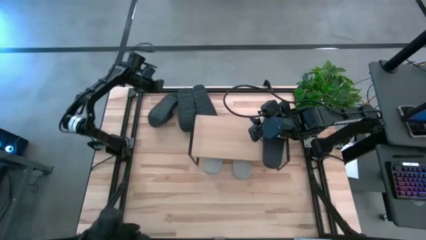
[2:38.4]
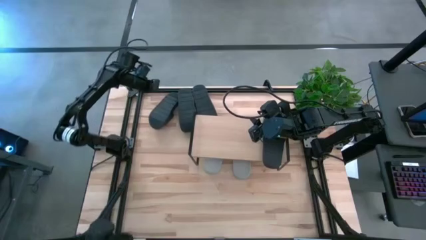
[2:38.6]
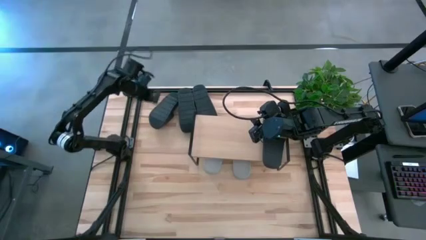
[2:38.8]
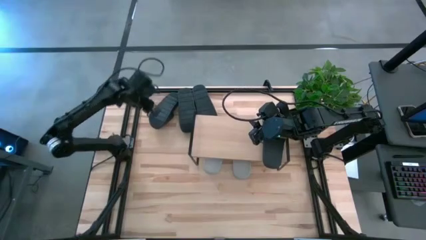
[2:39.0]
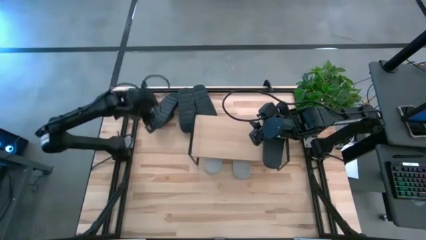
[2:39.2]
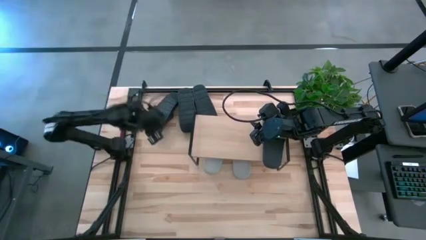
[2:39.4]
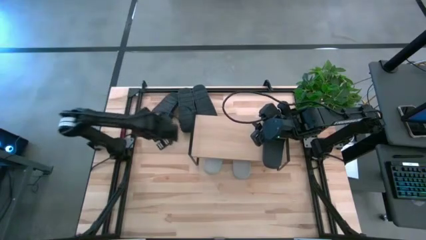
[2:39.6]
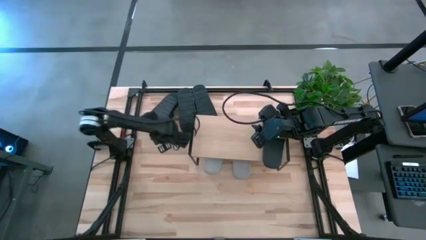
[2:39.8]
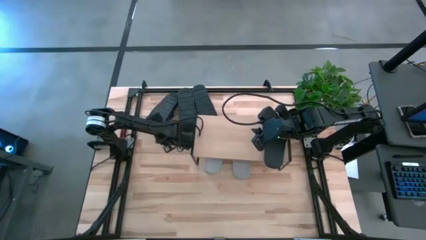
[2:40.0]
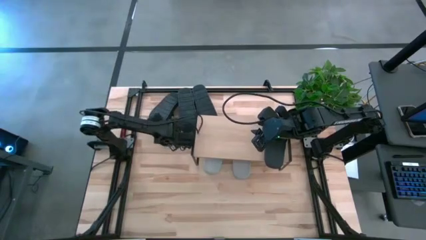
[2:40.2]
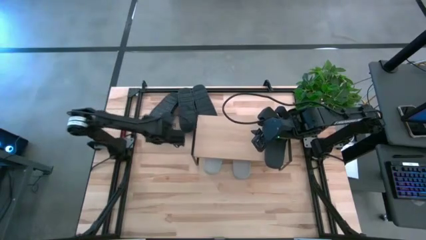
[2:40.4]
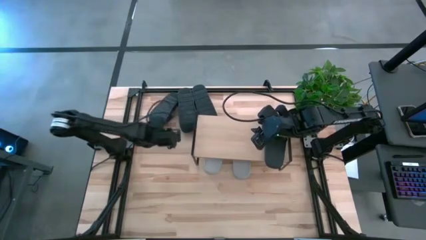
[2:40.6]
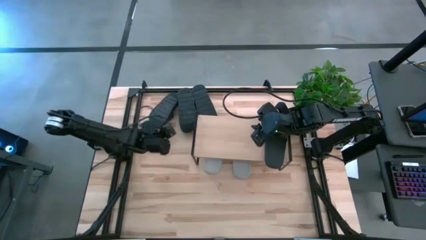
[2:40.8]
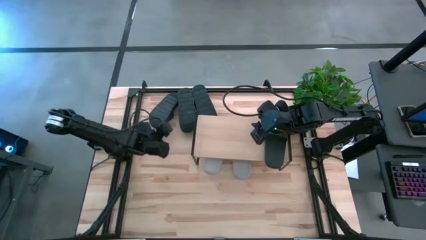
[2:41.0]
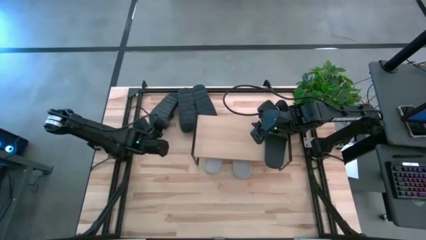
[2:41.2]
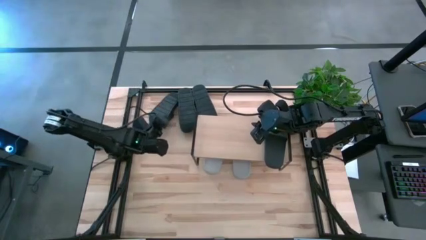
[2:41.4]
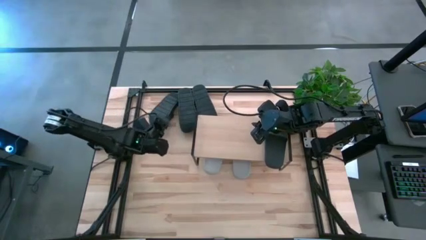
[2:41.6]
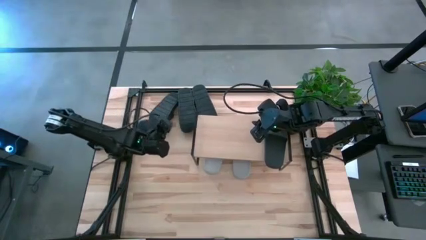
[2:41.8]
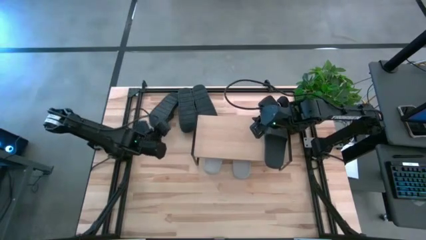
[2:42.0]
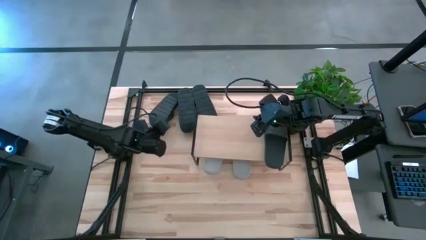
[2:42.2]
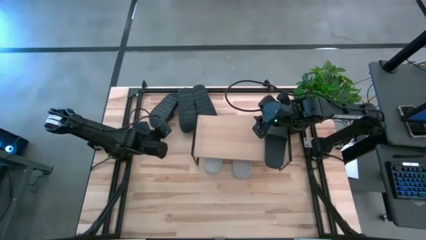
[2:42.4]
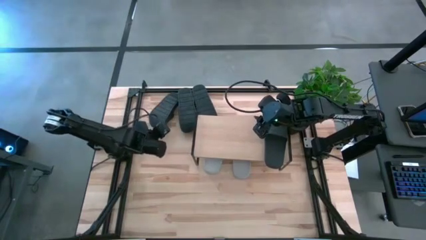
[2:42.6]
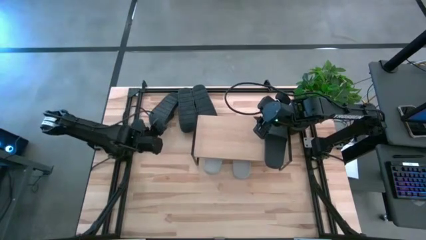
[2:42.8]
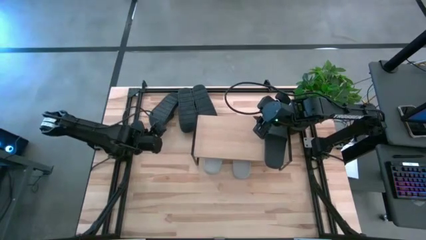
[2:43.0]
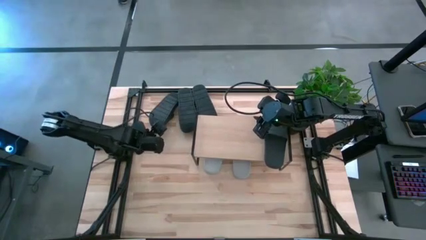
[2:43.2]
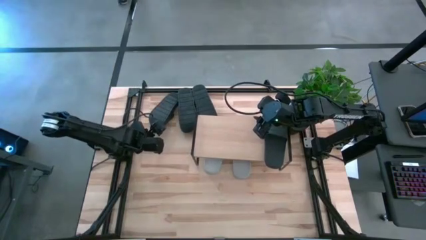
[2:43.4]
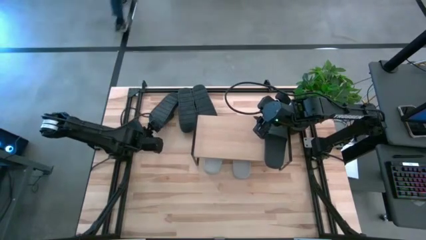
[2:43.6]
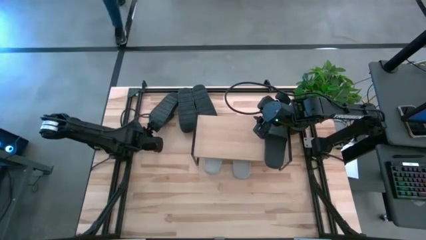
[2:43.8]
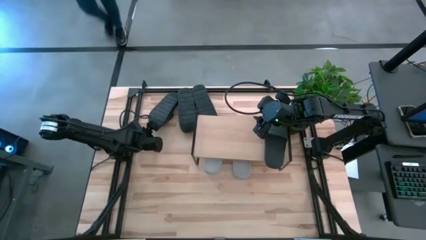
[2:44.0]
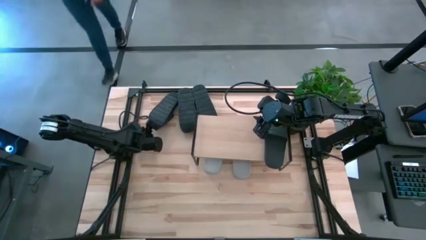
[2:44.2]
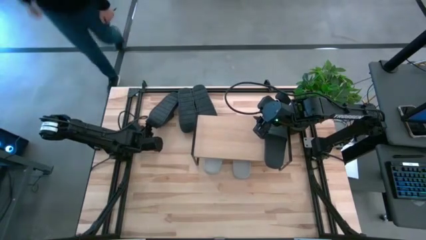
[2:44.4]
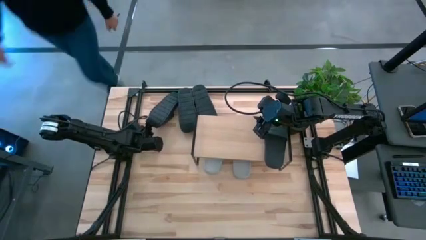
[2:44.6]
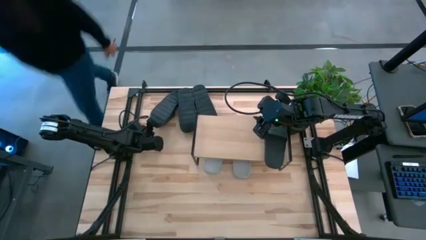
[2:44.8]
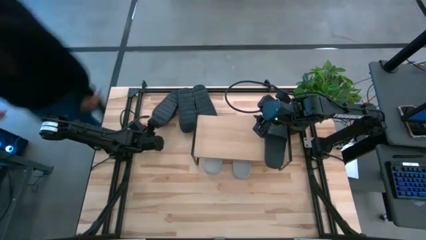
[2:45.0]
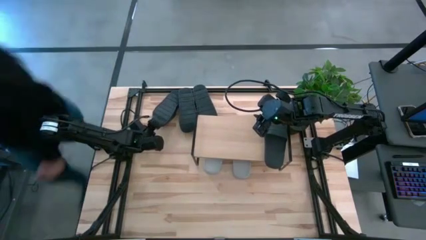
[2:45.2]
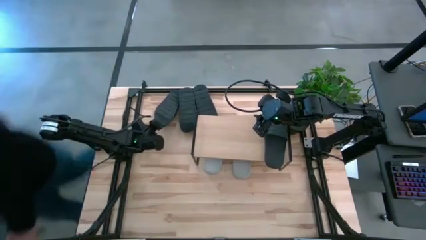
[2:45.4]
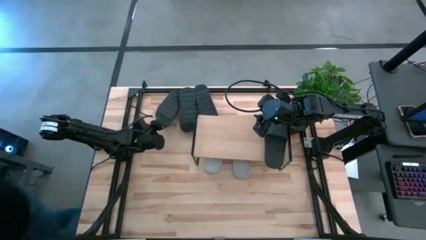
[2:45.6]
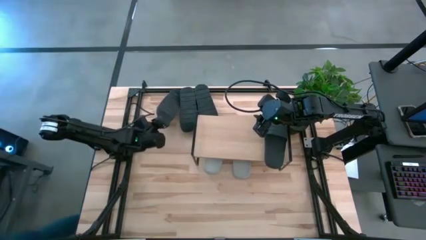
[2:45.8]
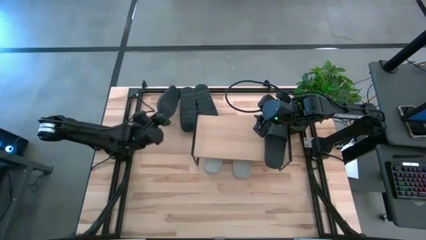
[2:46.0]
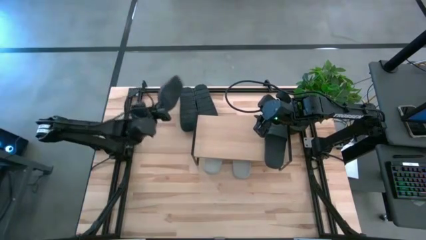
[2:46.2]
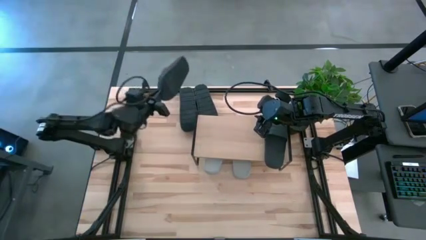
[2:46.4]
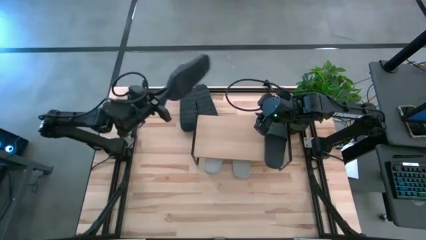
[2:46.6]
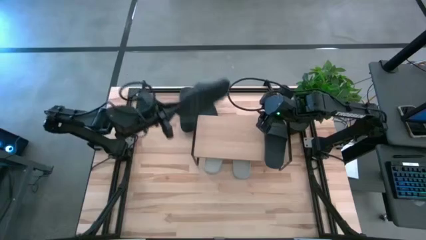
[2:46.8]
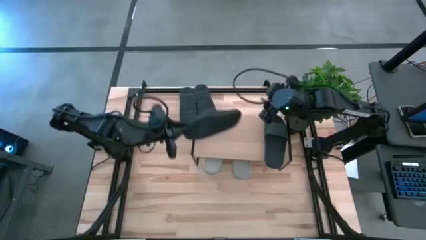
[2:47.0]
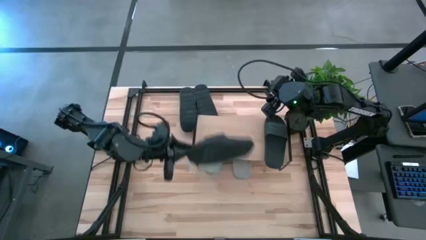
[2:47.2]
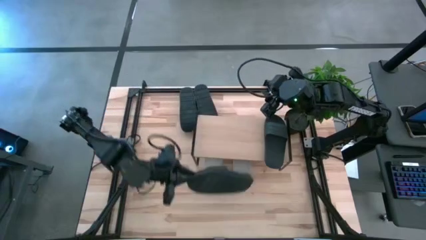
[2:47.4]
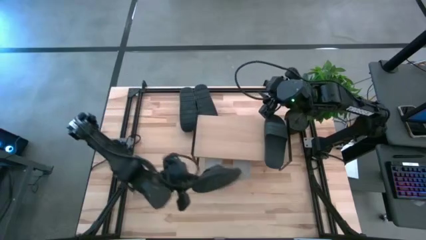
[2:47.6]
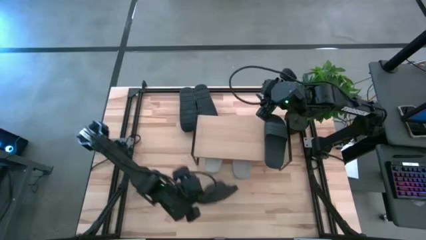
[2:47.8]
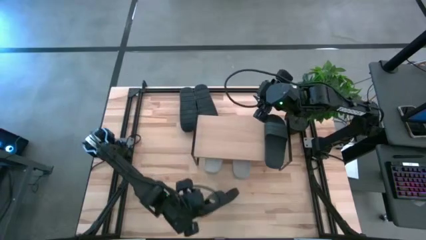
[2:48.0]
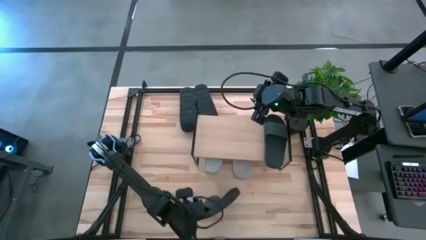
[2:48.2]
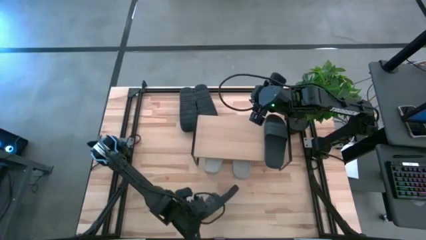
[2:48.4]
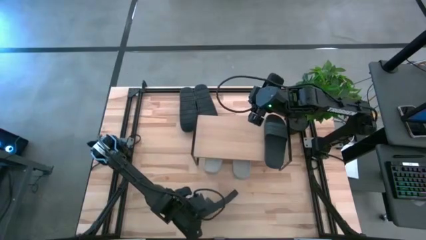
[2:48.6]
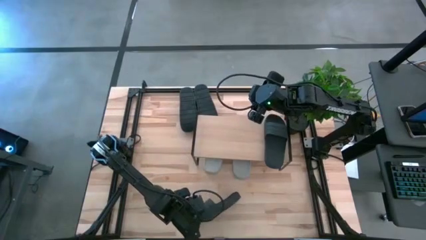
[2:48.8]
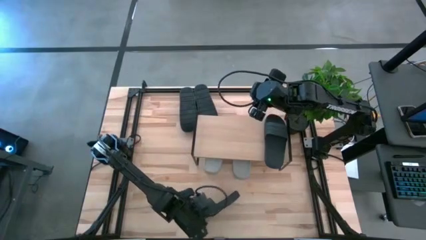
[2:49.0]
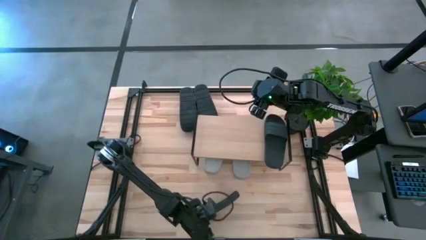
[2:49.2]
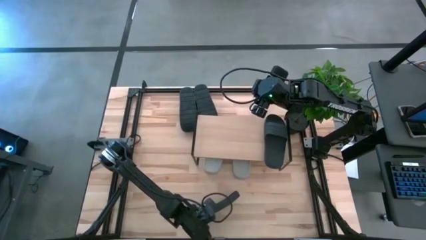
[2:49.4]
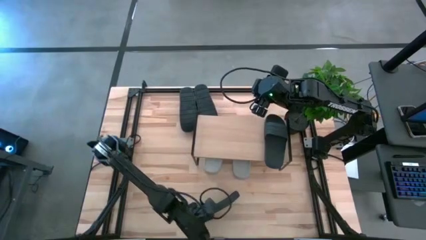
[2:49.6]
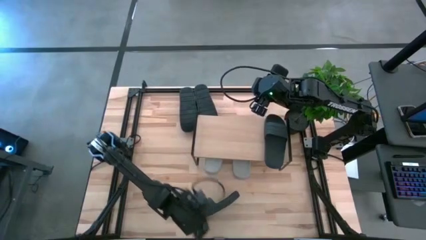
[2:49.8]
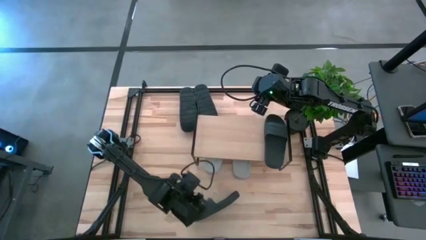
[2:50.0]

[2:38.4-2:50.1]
Task: Pick and place slides into the shelf
Put the black slipper on the shelf
